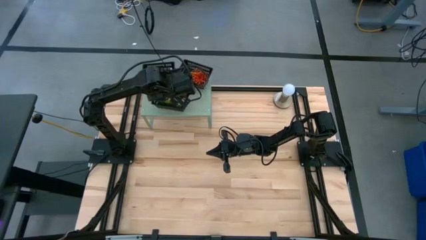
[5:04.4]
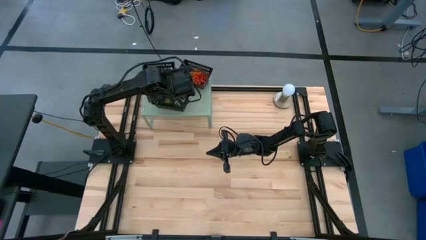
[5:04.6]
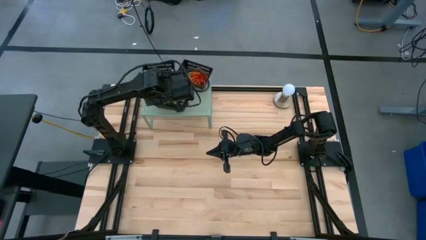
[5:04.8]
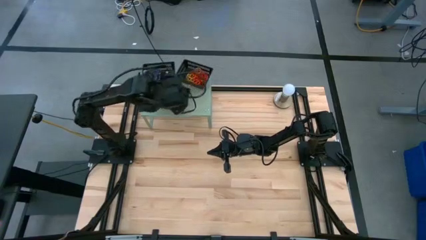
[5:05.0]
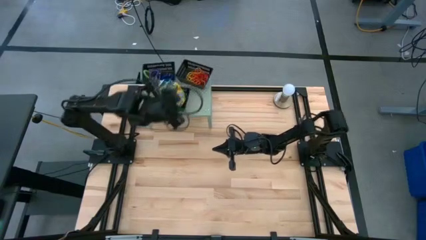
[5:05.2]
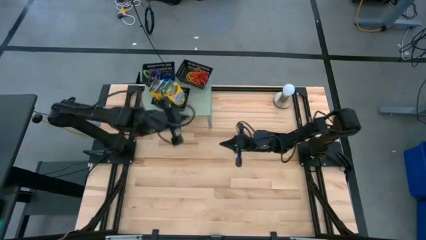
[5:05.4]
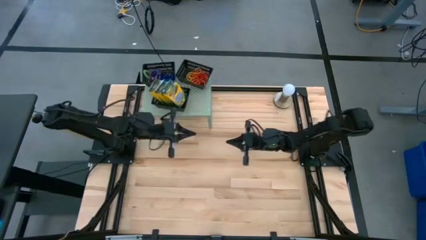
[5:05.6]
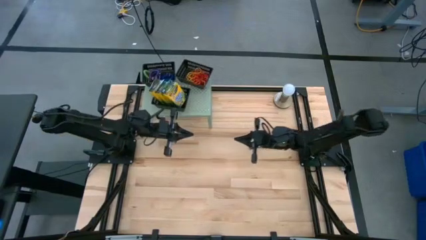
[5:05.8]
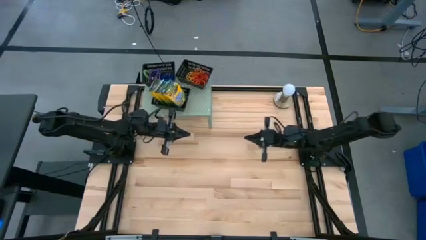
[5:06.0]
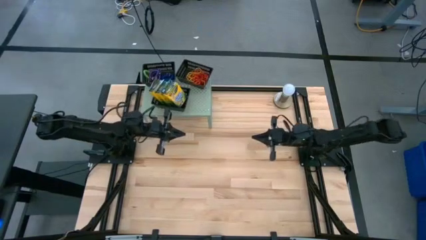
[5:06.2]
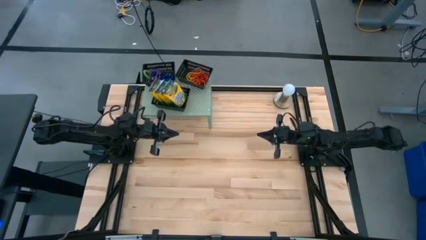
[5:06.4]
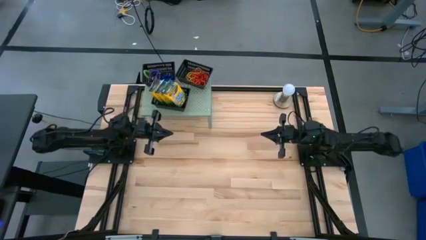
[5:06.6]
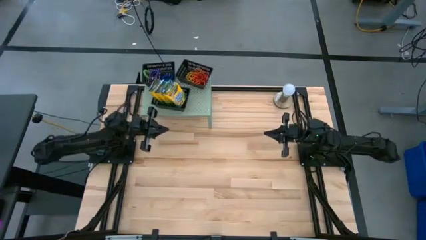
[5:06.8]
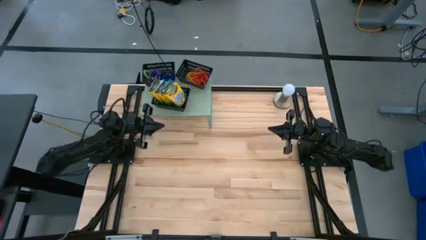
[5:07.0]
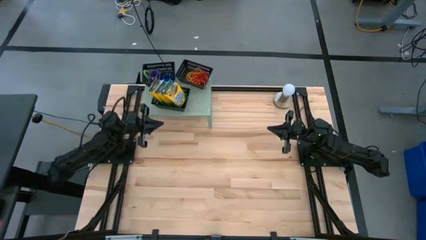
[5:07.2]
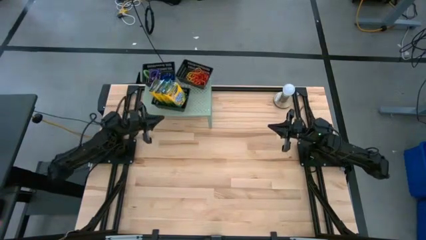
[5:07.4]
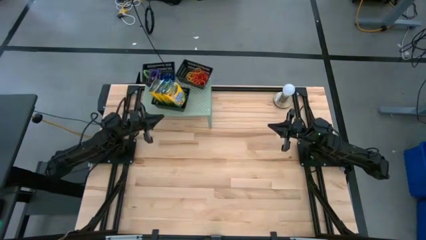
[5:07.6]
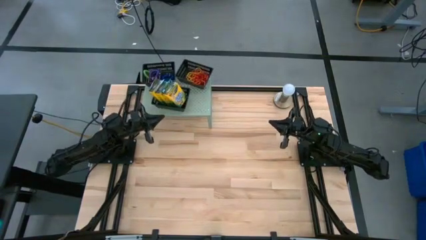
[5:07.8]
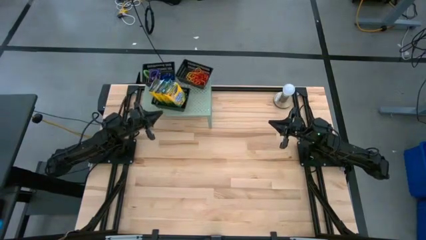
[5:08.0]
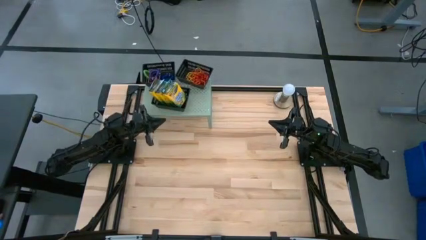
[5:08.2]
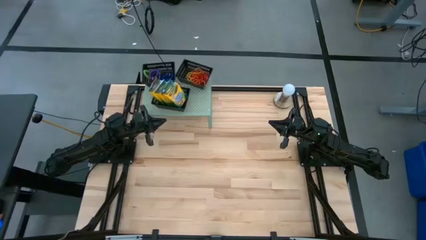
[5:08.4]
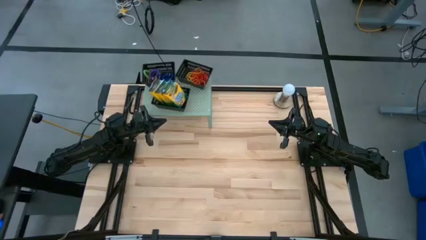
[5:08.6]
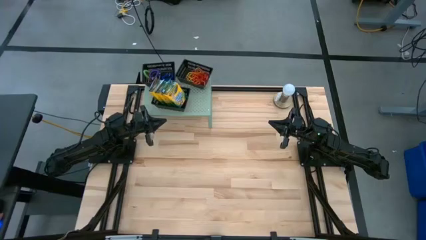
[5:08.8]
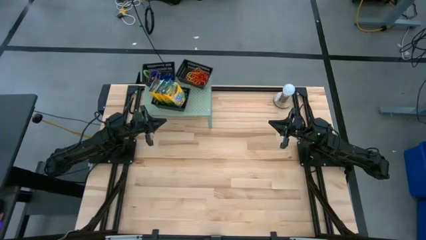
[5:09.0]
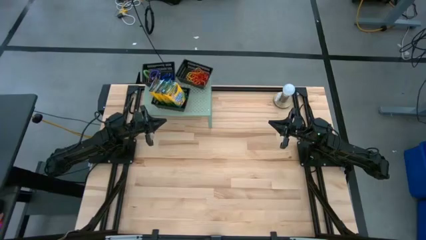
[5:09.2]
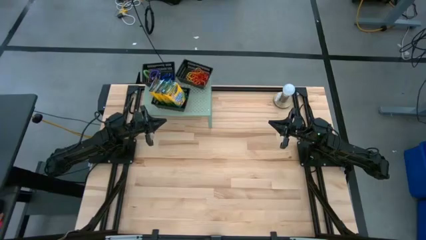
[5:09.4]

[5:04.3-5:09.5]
Task: Pick & Place Office Desk Supplies
Return to Home Position

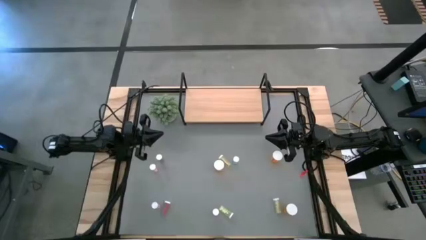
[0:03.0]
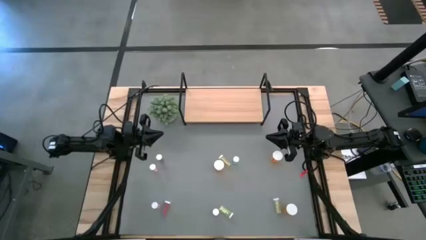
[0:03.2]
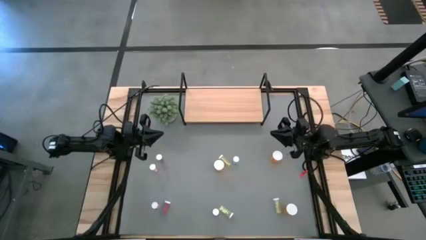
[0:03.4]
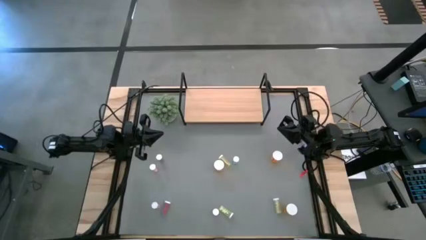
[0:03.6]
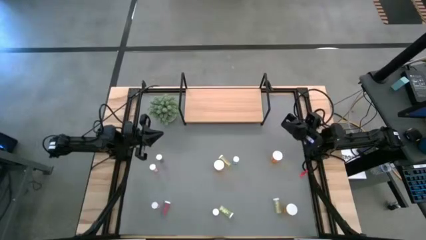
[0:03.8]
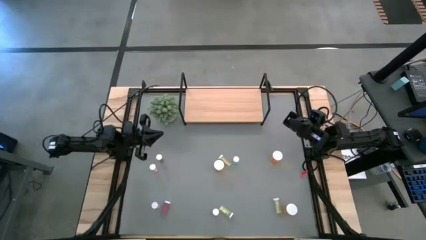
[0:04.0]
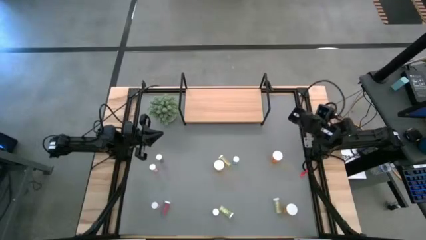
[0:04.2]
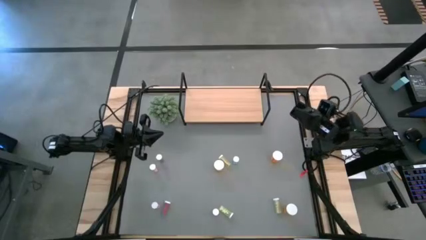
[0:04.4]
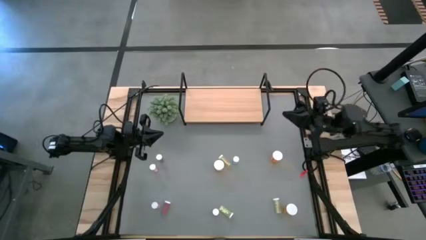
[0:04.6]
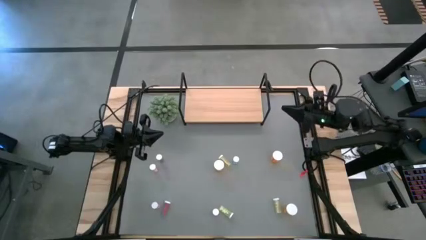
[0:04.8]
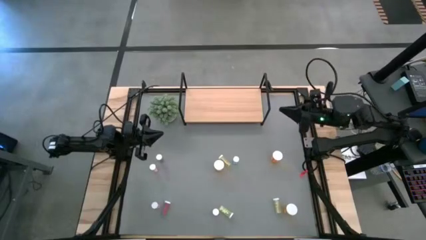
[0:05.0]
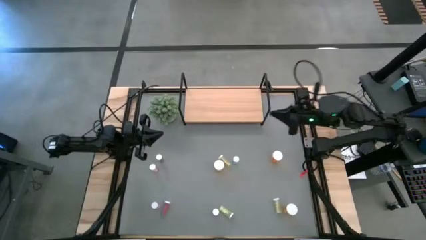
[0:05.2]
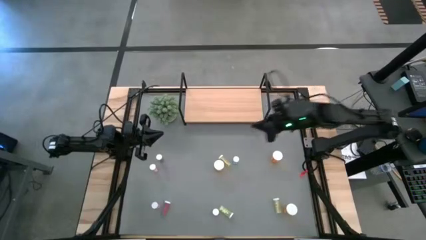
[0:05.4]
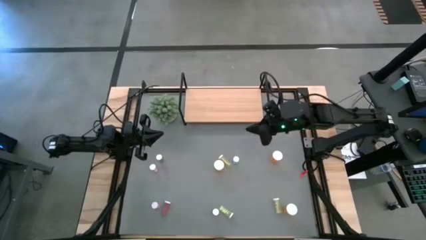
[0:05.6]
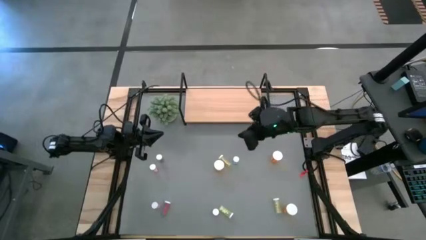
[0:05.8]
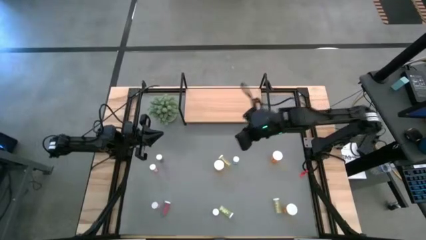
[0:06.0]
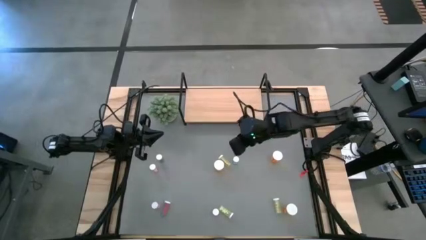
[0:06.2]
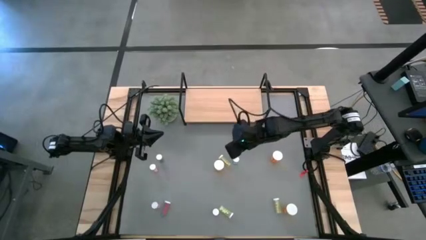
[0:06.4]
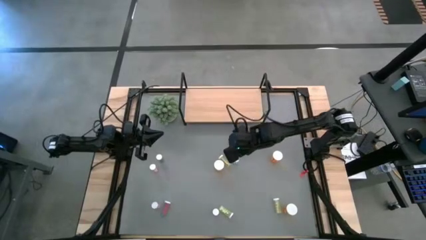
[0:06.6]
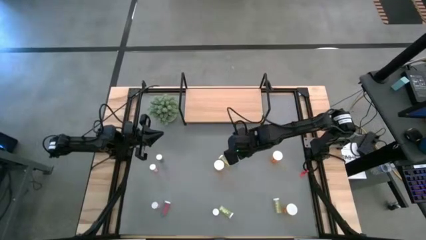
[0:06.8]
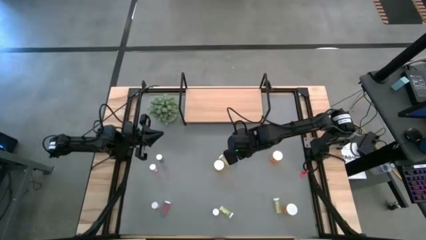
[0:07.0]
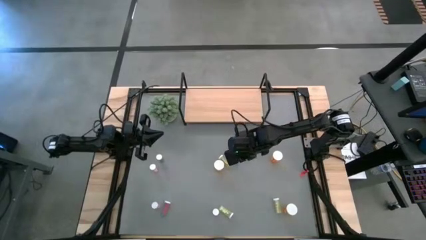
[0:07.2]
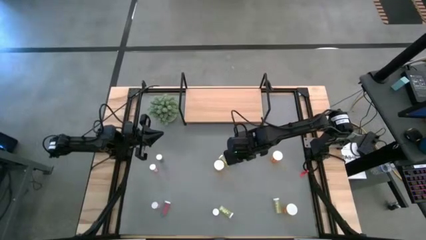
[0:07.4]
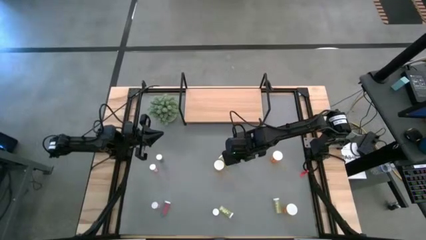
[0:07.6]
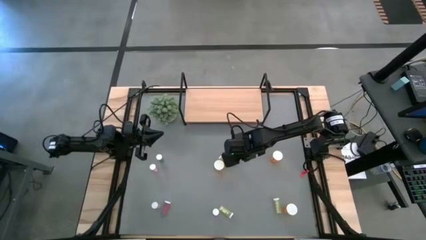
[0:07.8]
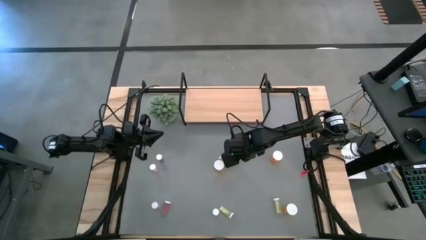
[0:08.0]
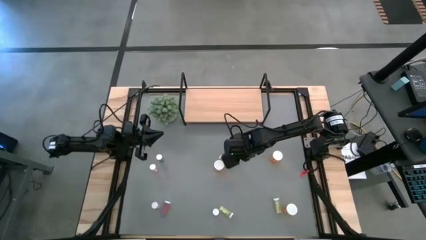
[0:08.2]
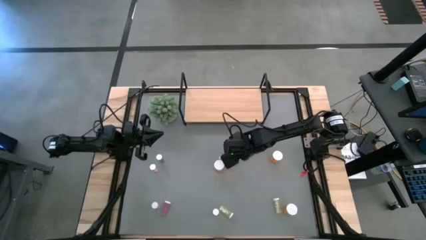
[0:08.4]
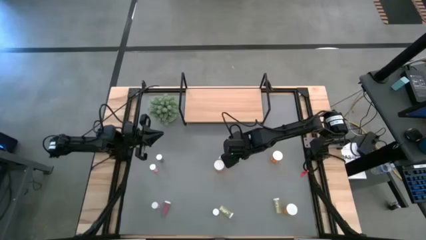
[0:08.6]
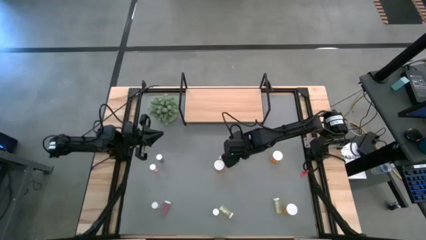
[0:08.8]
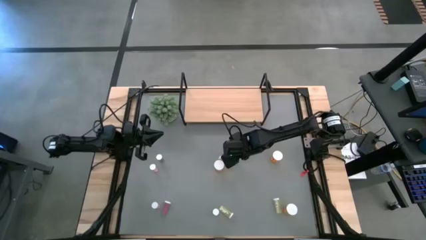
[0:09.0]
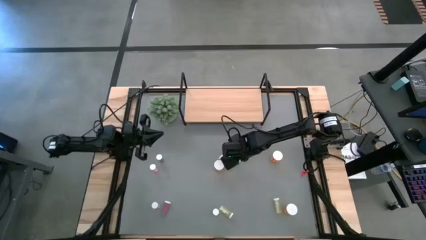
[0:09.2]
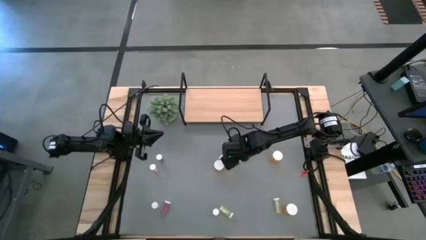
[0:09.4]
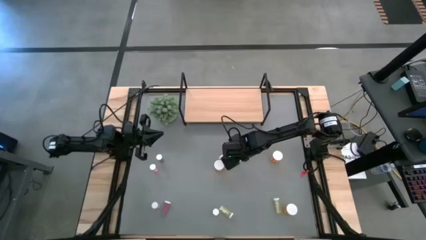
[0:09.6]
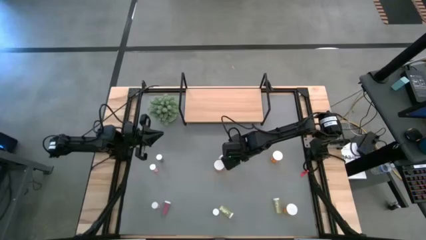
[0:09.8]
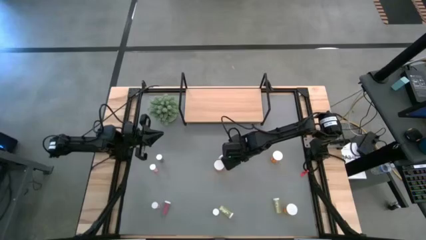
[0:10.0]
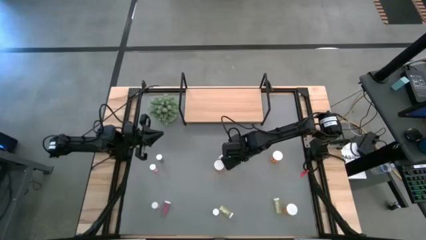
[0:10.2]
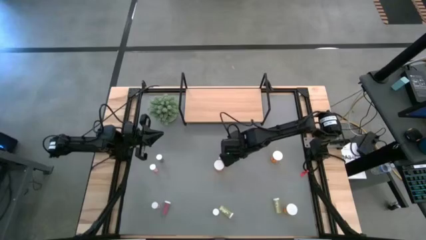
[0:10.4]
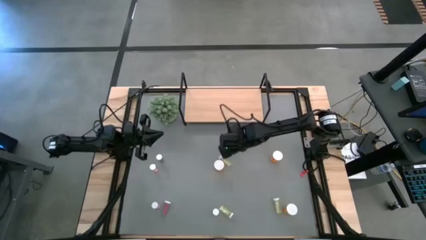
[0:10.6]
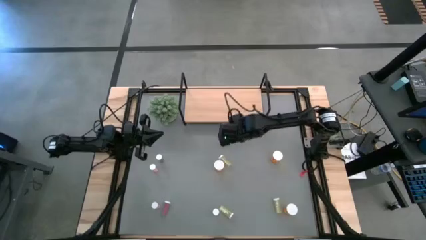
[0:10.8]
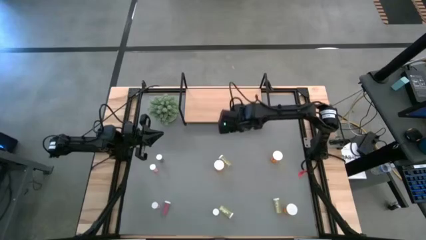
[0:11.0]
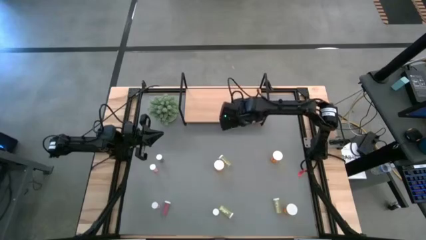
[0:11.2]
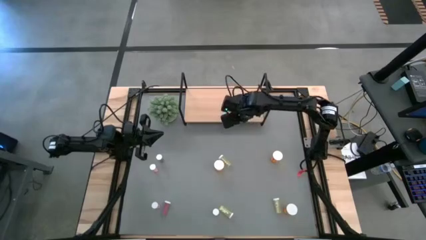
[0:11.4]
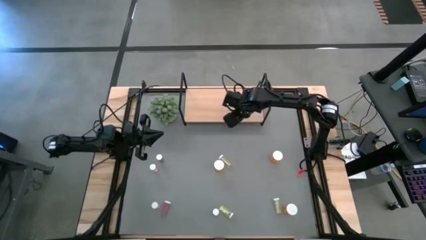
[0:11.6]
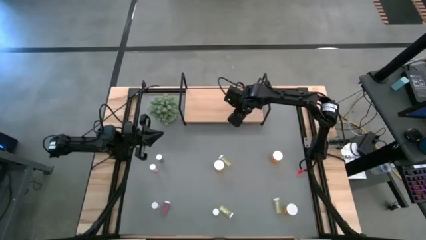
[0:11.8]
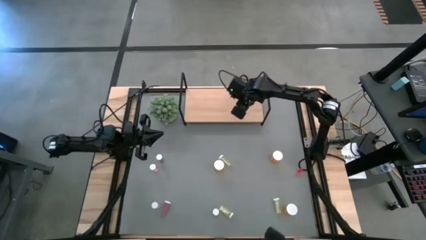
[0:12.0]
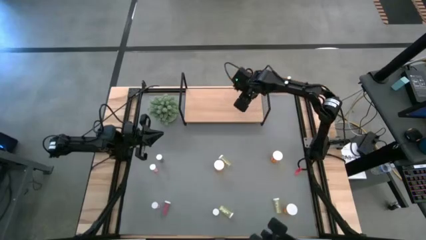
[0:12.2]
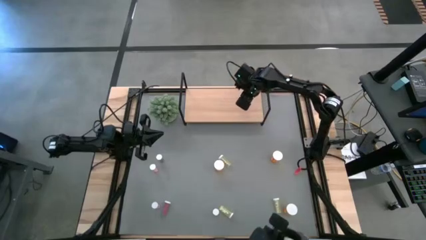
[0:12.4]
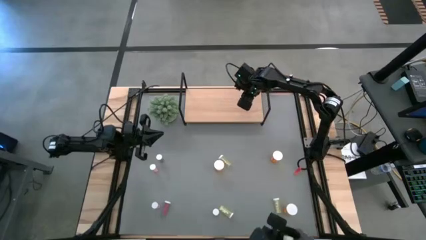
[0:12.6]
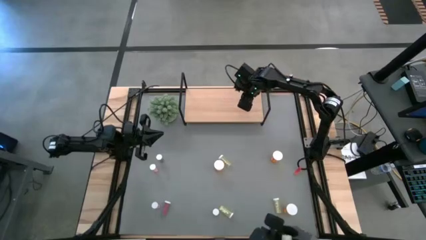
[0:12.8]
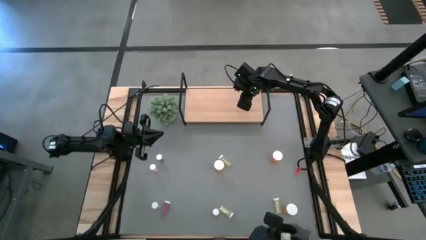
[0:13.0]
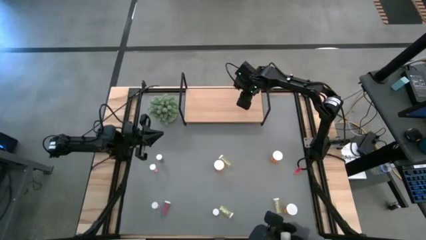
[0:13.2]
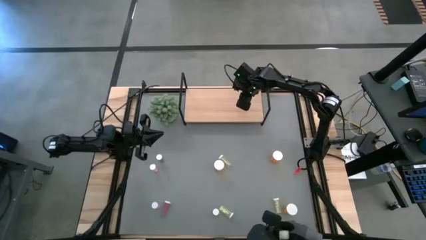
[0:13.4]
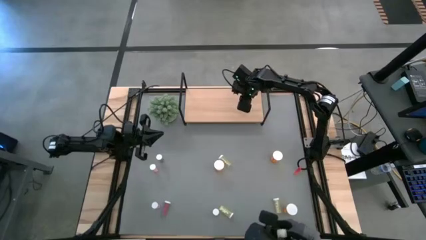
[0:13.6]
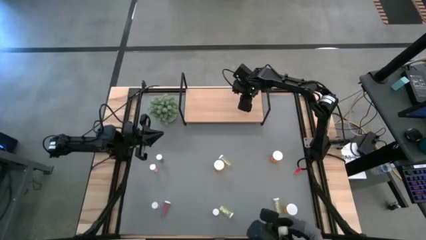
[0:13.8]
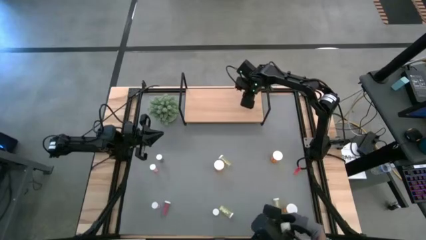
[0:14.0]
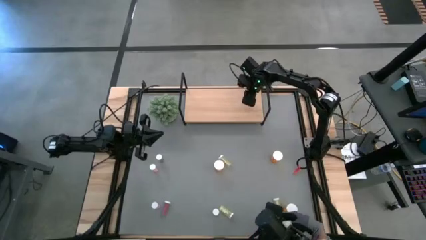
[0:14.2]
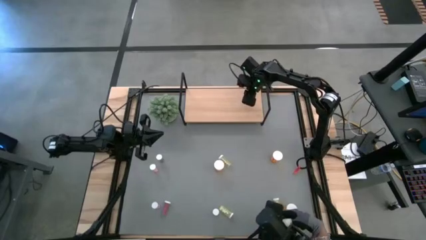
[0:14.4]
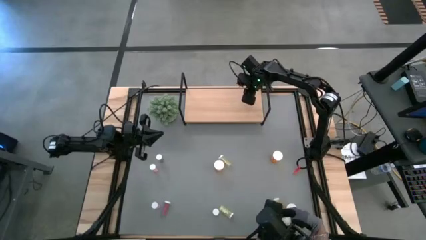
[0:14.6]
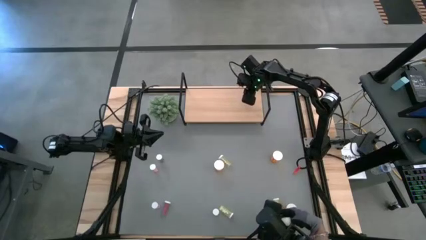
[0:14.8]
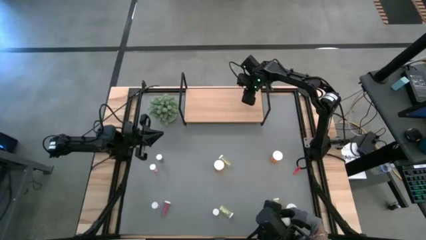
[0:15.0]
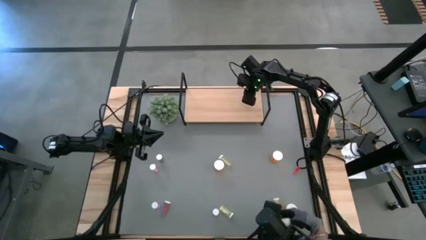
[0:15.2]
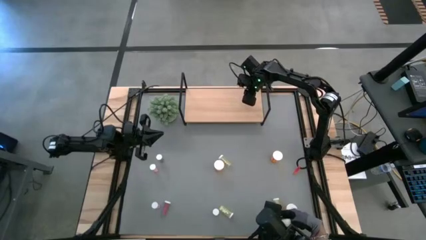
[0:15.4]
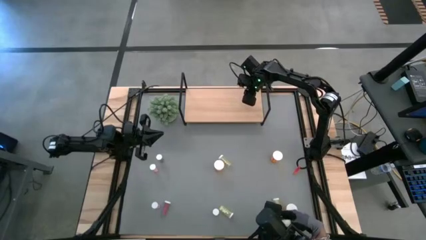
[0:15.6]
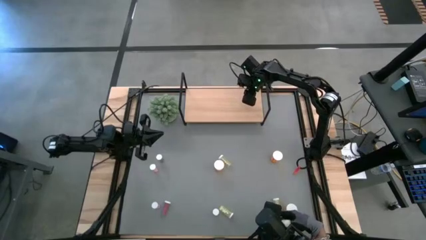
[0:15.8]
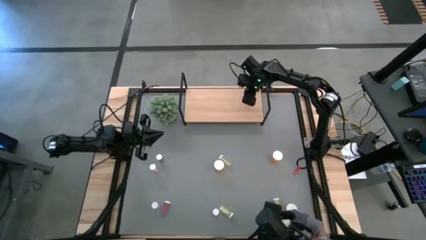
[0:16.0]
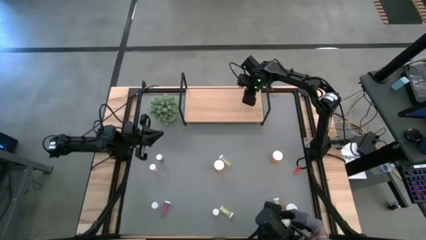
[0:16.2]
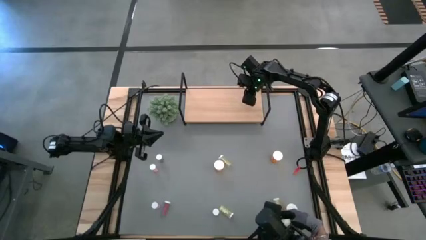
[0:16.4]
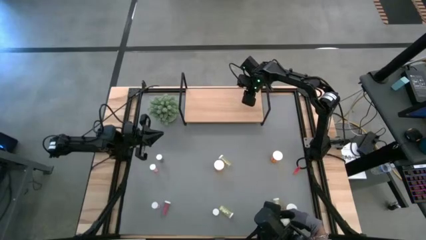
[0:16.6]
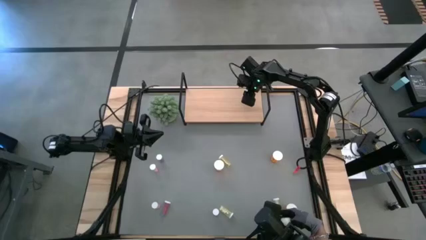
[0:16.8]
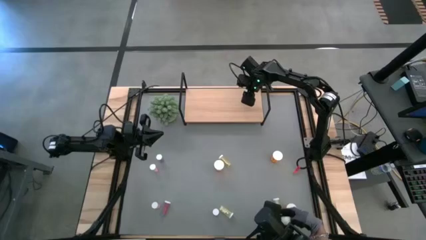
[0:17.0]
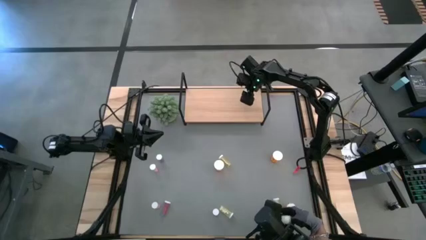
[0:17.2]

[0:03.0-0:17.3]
Task: Pick and place medicine bottles onto shelf by color
Put the top right blue pill bottle on the shelf
